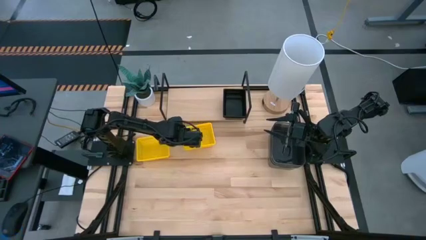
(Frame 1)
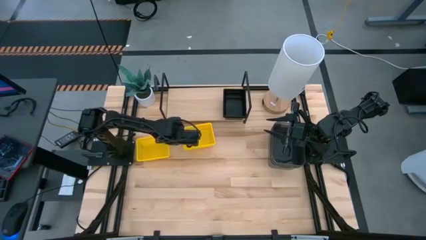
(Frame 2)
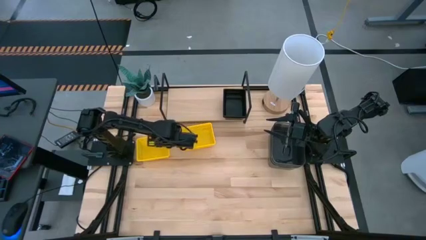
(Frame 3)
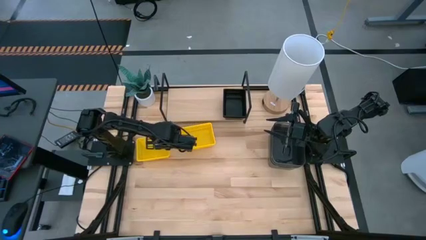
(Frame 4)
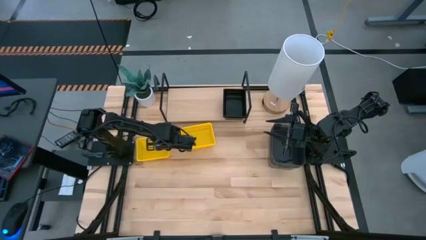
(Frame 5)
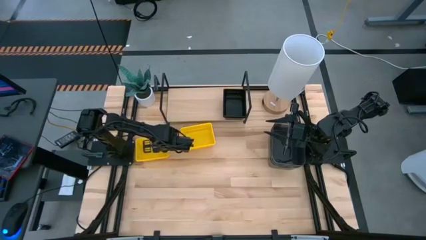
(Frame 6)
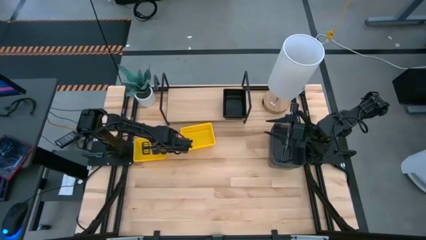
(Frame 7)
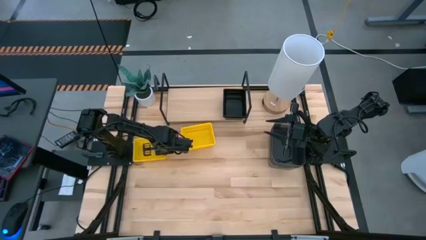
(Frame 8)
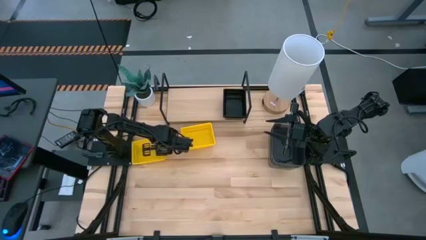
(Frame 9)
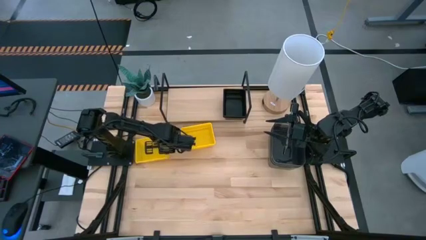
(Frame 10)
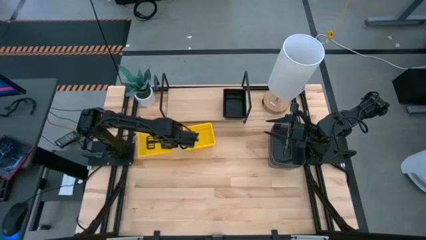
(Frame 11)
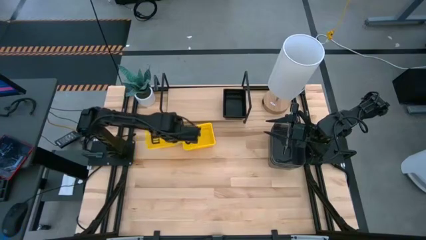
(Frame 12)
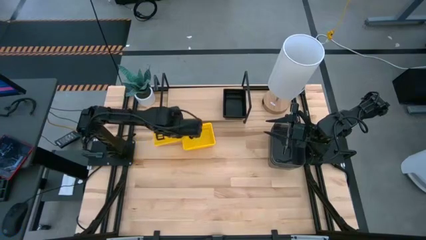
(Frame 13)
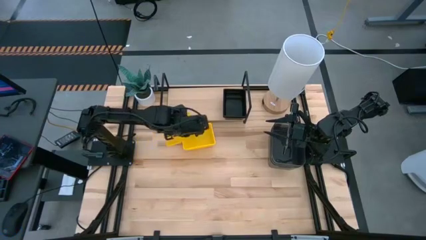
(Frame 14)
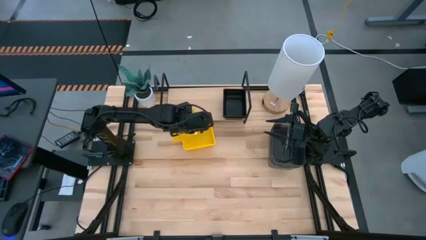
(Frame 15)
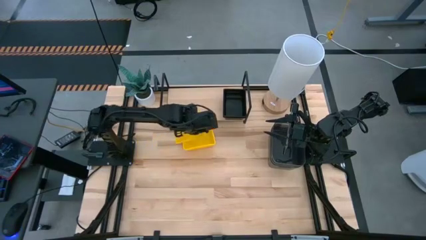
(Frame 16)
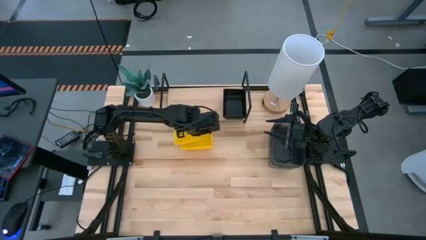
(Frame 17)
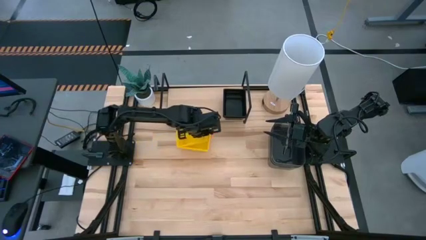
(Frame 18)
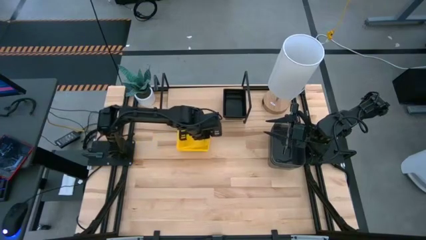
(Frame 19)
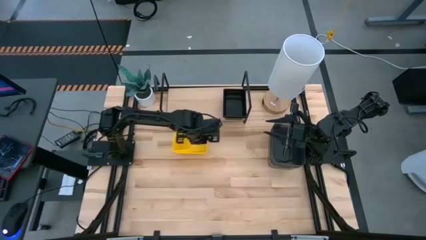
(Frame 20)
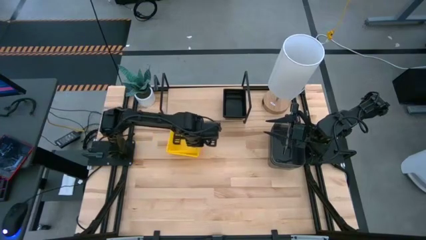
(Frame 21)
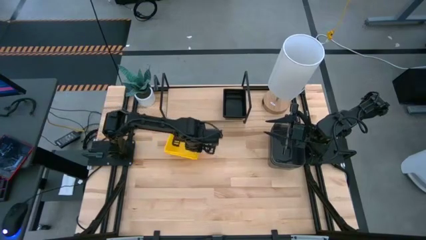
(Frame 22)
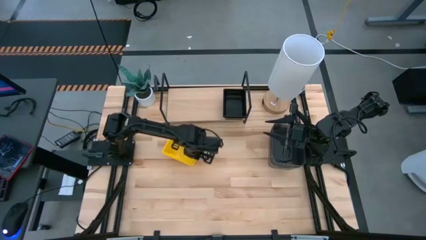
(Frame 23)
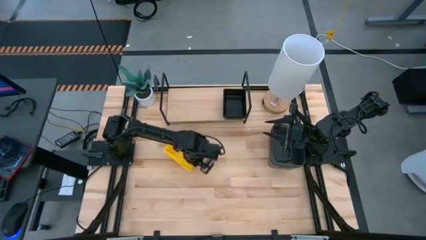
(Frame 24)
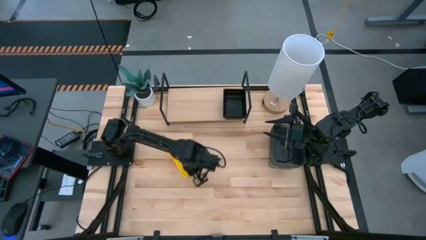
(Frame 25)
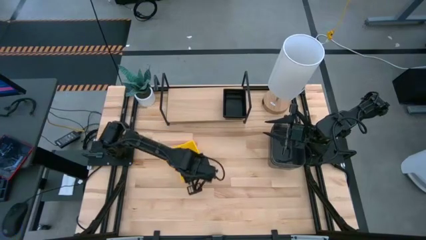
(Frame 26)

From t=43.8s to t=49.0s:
Task: Stack baskets on shelf by color
Stack the left yellow bin on the yellow bin

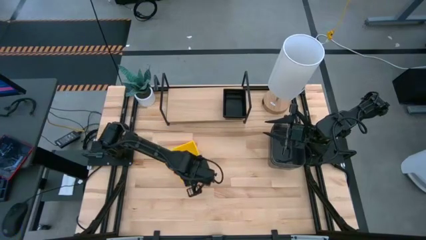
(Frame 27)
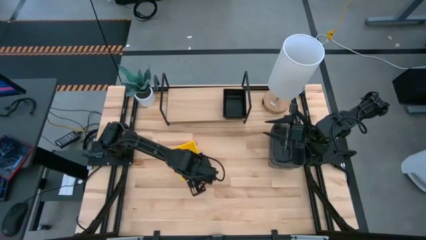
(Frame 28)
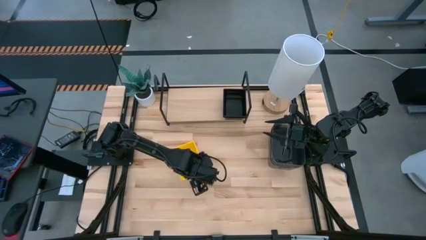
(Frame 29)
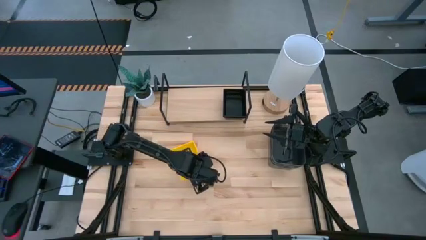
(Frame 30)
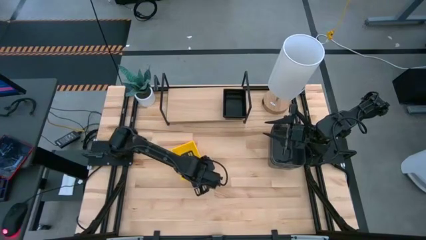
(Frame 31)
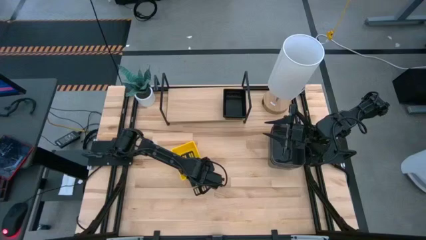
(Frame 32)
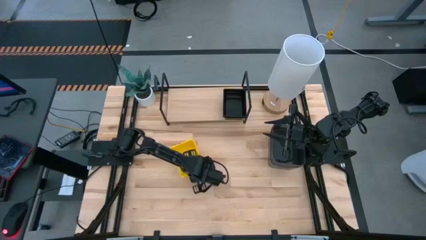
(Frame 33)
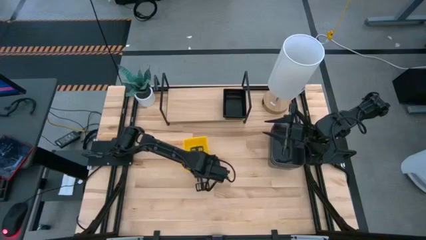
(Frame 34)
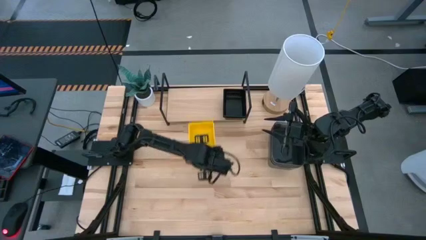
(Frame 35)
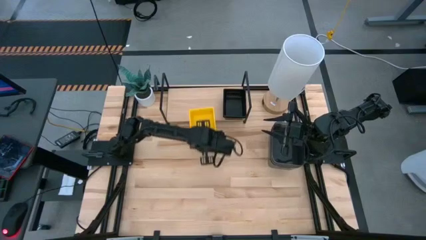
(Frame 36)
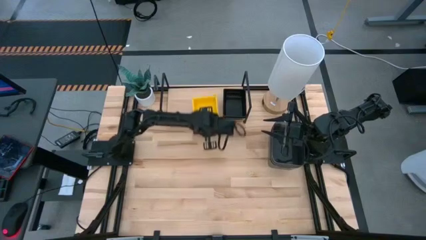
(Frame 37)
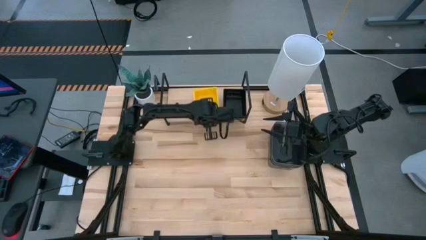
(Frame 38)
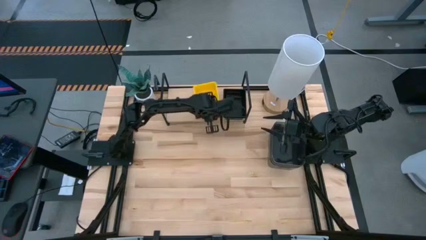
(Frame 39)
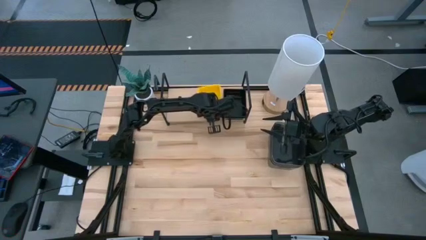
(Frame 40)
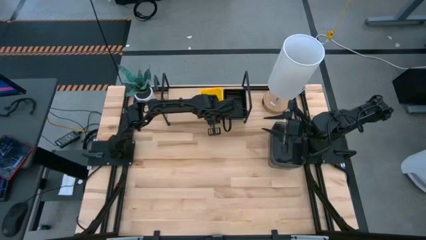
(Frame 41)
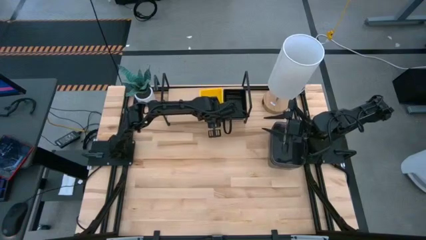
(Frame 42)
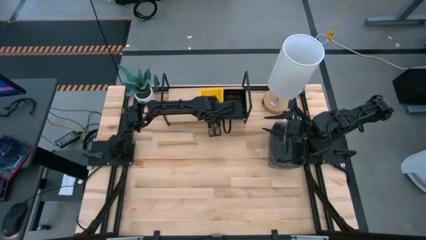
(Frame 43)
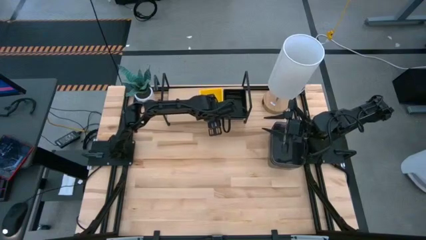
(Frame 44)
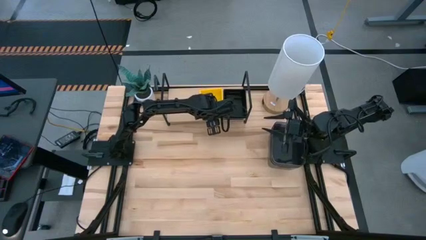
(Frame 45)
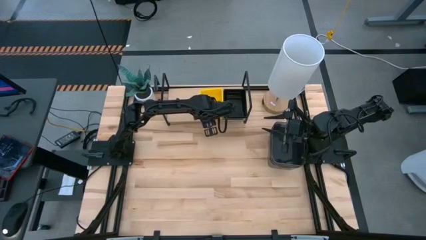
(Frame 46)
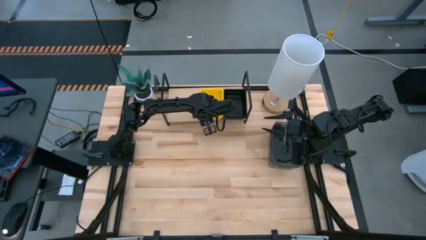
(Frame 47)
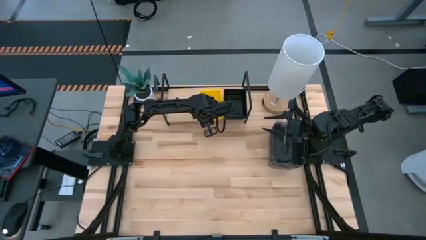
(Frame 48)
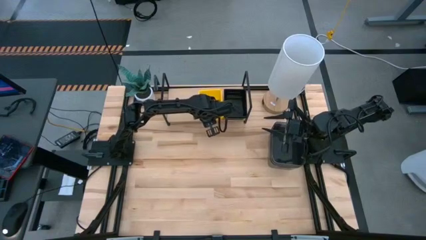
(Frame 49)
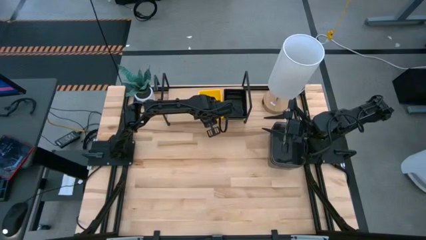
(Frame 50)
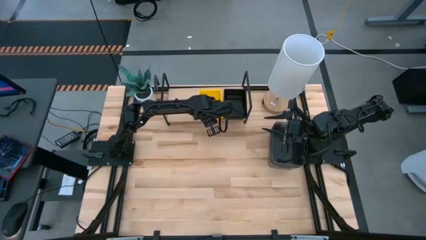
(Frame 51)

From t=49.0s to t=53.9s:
Put the stacked yellow bins on the shelf

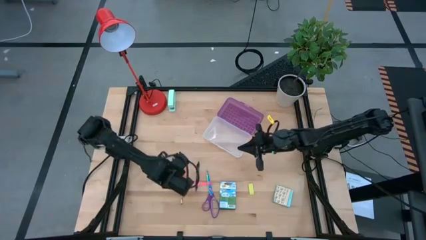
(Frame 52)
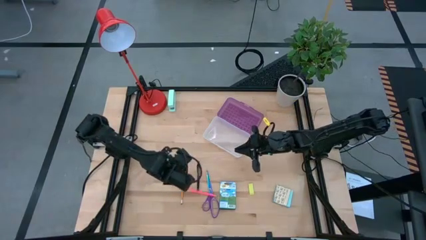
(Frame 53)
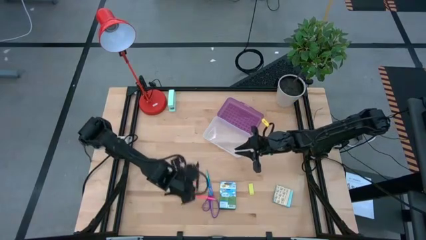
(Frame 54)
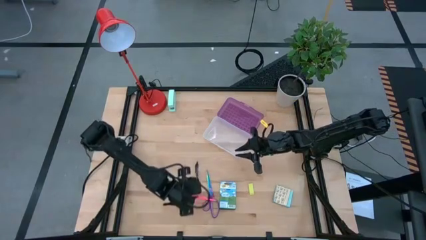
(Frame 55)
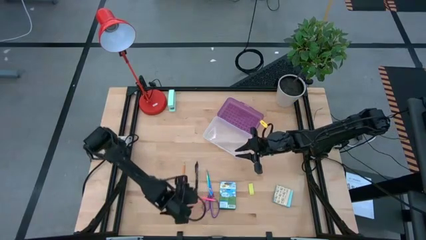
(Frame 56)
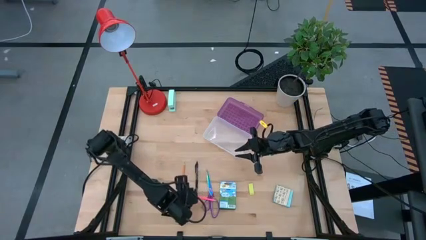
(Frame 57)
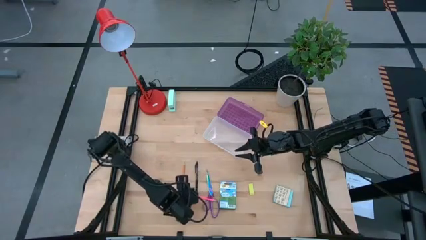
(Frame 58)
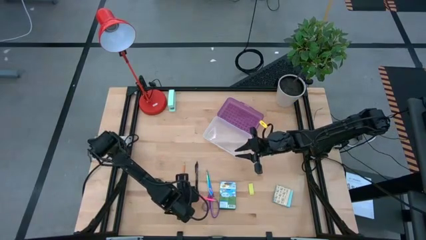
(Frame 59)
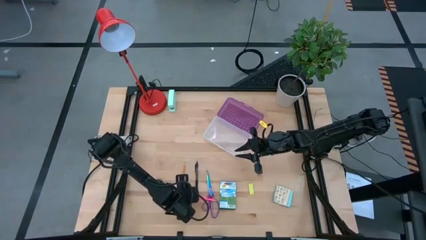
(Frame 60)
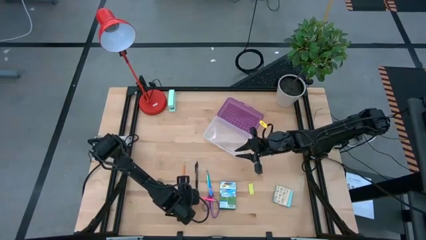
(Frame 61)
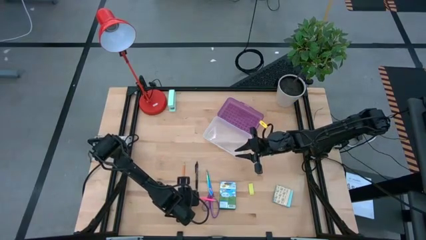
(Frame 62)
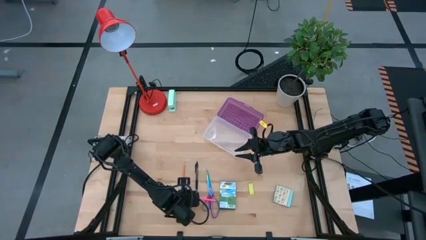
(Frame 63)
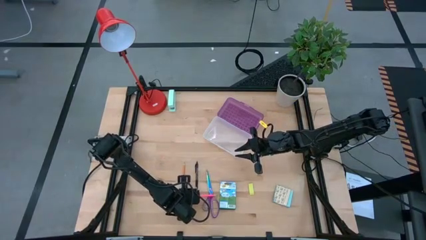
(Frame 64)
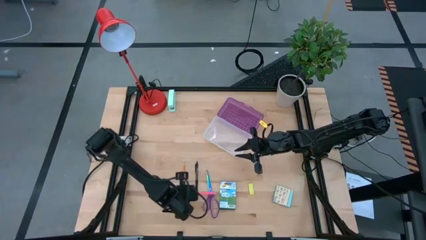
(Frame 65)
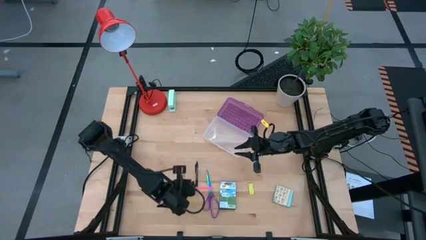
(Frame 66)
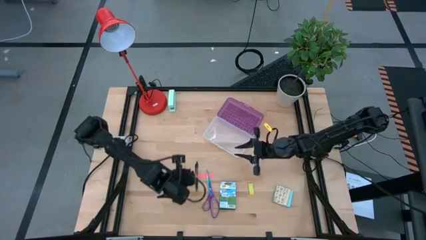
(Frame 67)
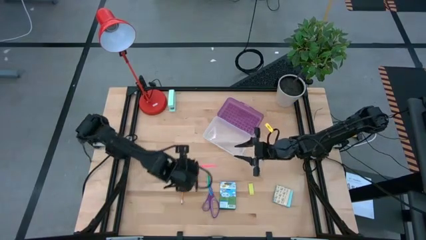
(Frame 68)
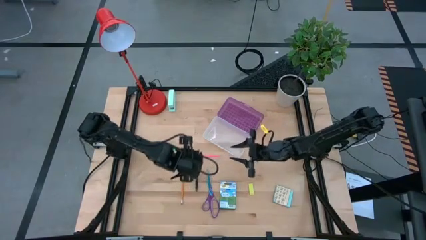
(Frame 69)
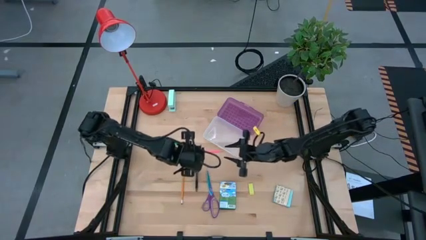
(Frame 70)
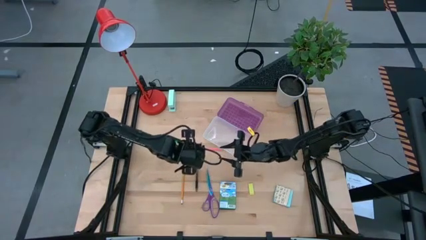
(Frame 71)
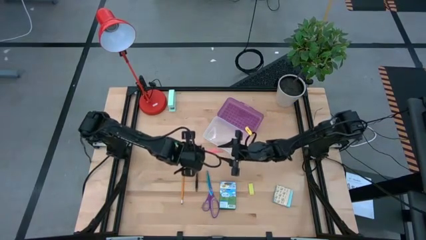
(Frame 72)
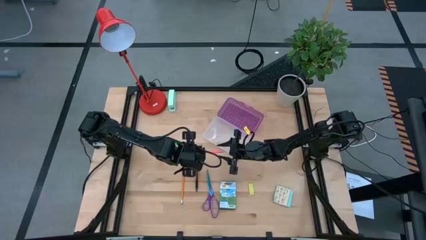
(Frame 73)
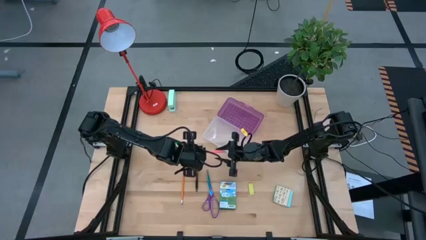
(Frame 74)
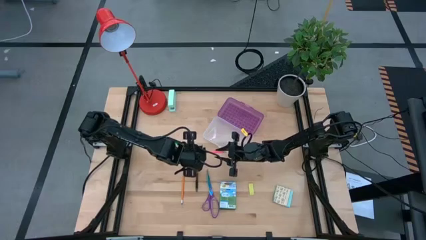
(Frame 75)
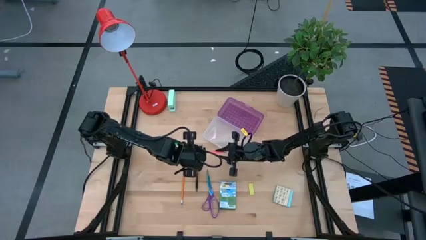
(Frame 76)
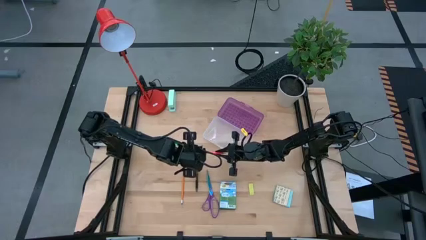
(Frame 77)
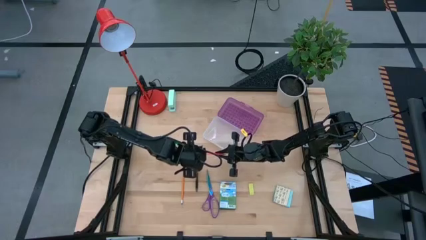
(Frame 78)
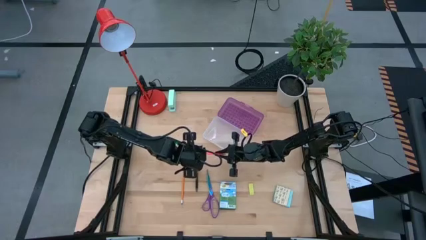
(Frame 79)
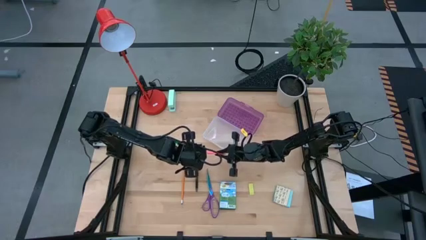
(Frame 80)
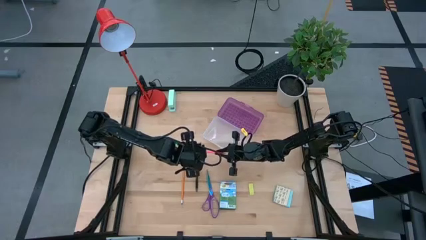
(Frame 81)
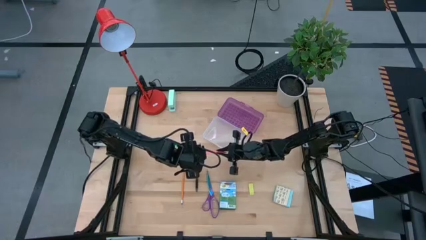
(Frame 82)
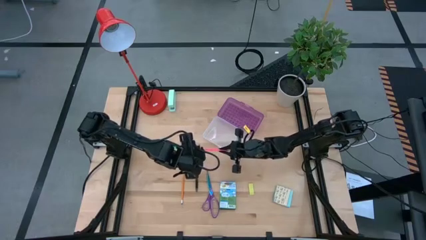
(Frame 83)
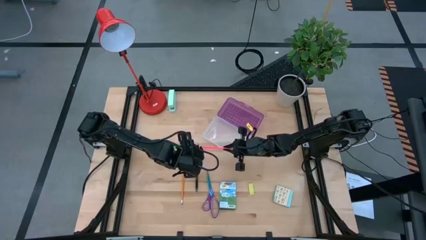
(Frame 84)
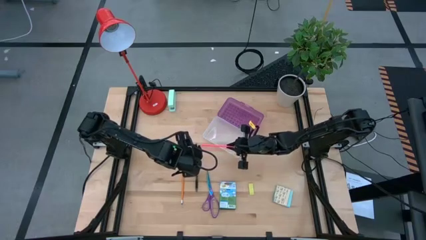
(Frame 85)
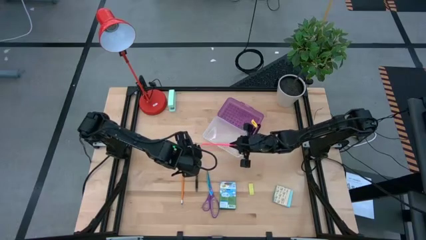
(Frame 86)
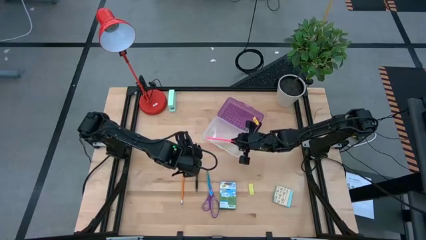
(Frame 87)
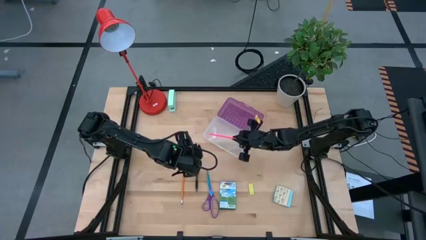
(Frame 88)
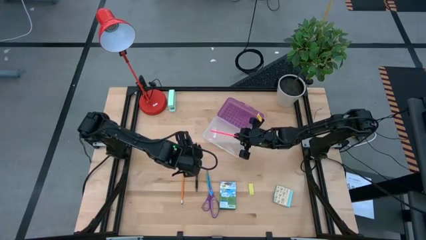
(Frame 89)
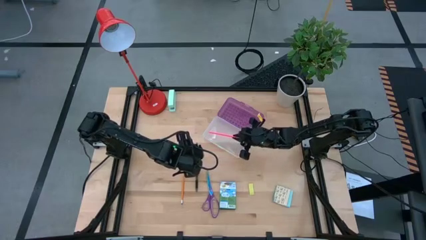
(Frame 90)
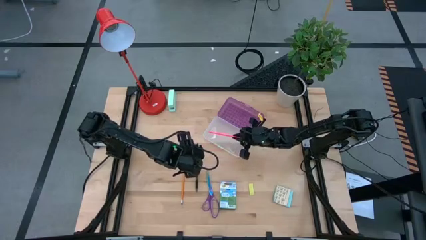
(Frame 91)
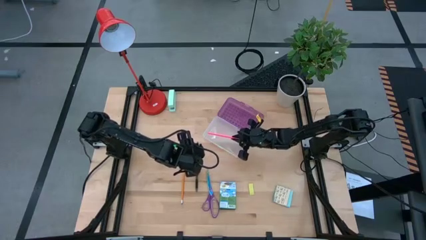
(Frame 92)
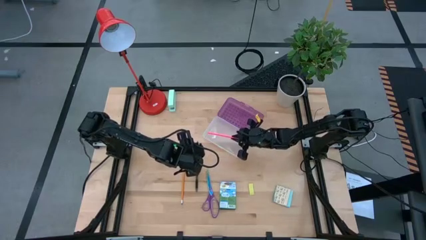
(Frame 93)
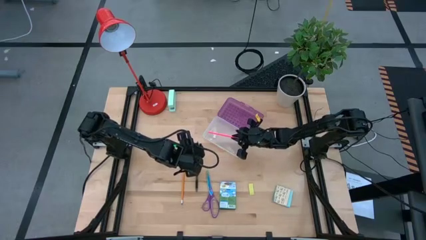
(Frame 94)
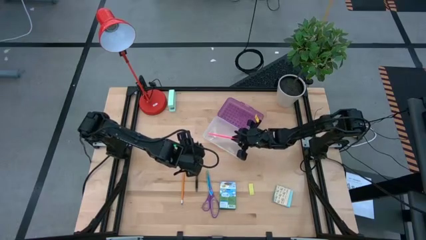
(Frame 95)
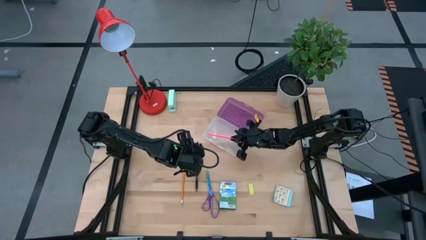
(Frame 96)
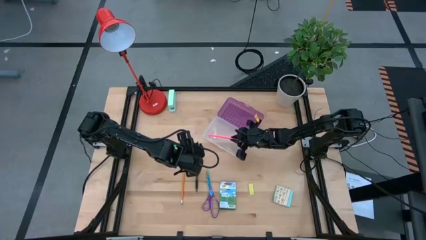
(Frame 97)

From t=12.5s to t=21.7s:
Task: Pack school essentials
Put the pink pencil into the purple supply box
